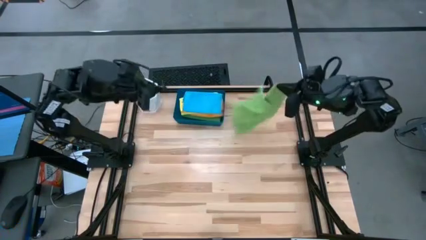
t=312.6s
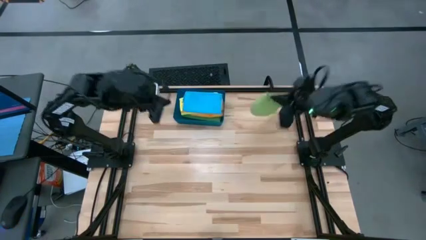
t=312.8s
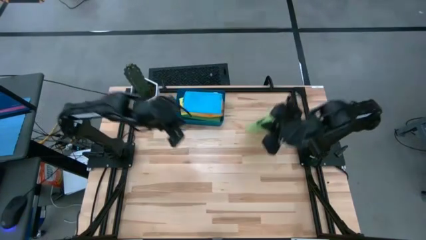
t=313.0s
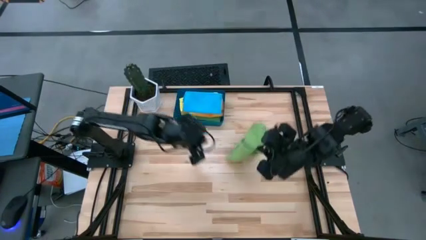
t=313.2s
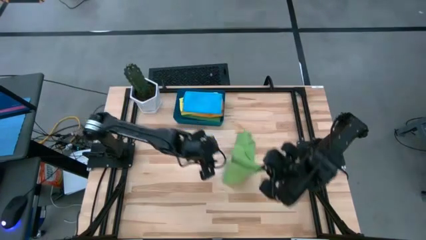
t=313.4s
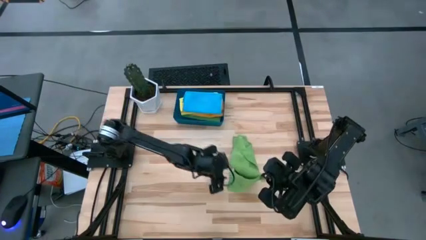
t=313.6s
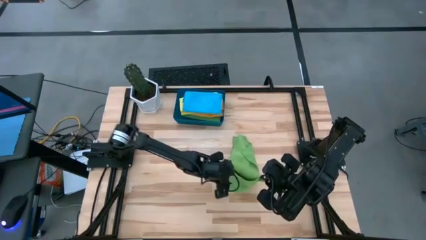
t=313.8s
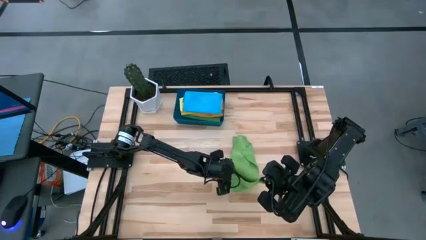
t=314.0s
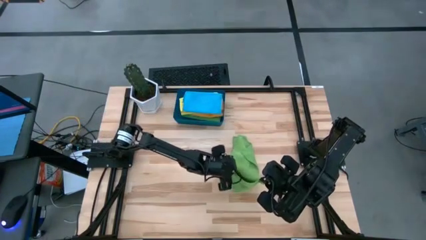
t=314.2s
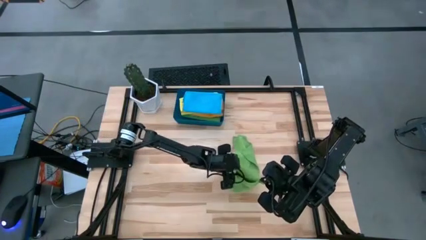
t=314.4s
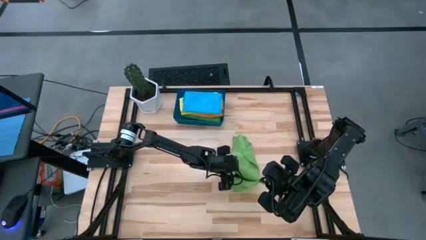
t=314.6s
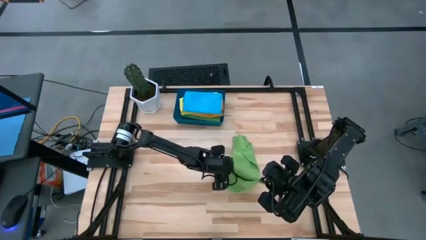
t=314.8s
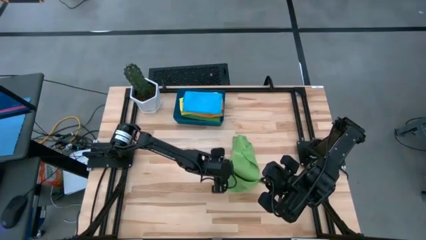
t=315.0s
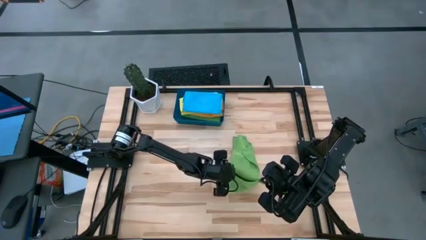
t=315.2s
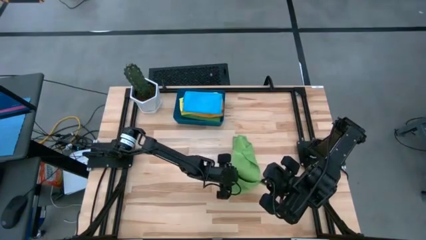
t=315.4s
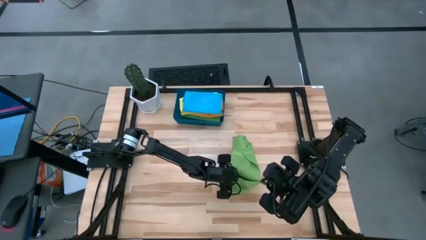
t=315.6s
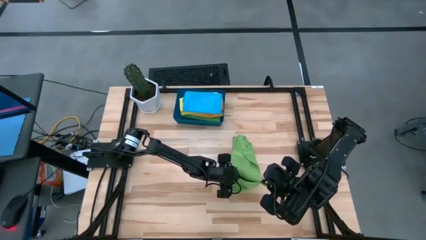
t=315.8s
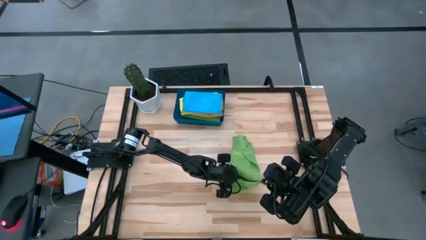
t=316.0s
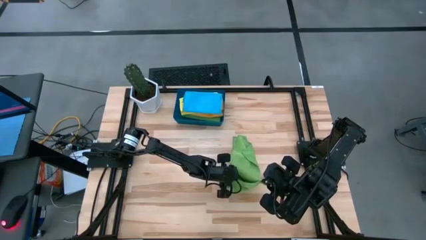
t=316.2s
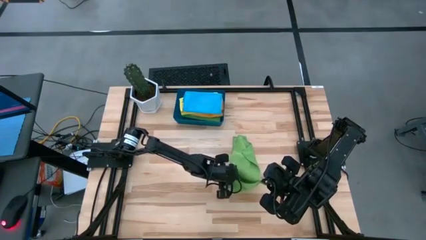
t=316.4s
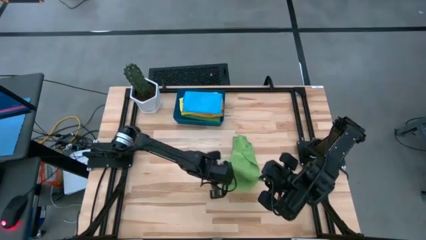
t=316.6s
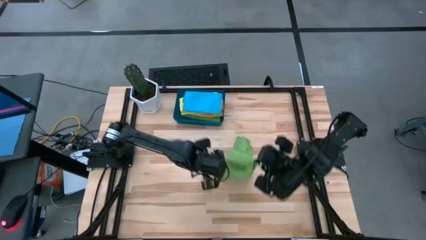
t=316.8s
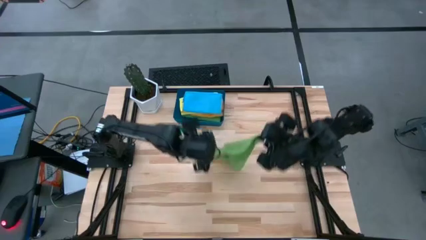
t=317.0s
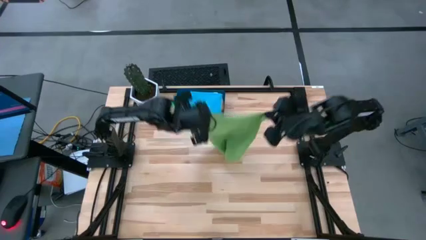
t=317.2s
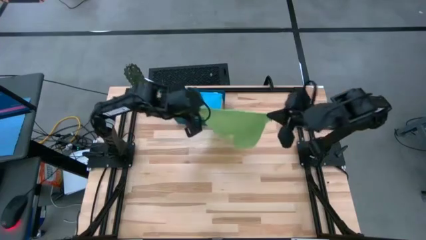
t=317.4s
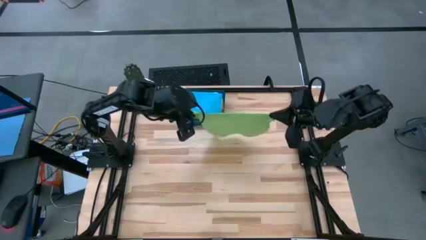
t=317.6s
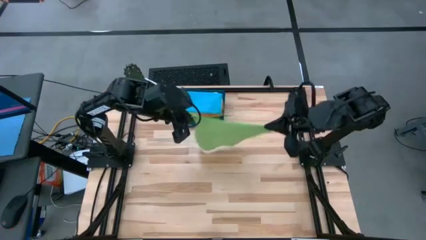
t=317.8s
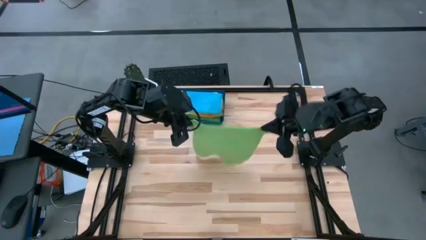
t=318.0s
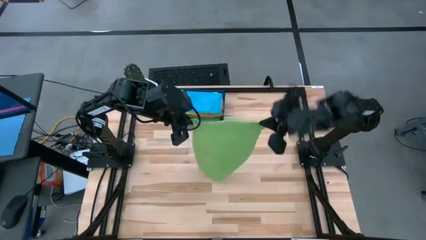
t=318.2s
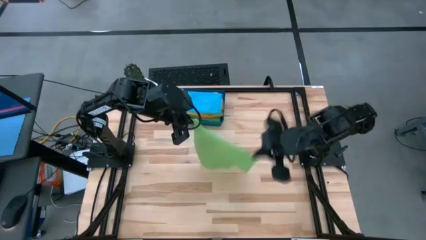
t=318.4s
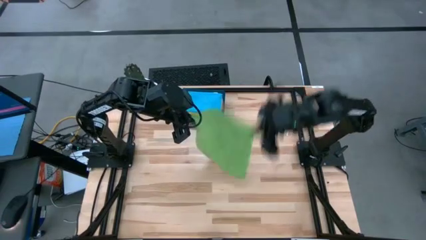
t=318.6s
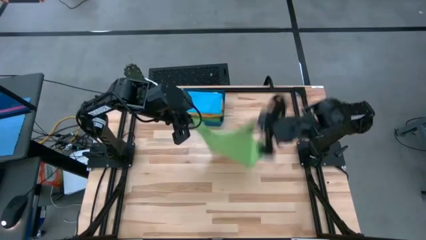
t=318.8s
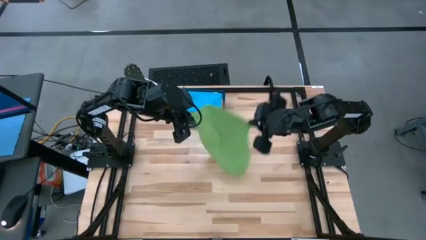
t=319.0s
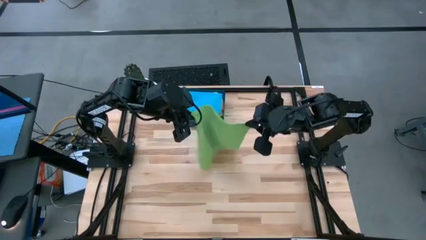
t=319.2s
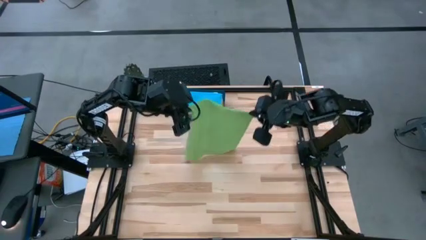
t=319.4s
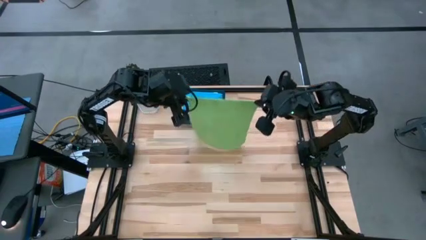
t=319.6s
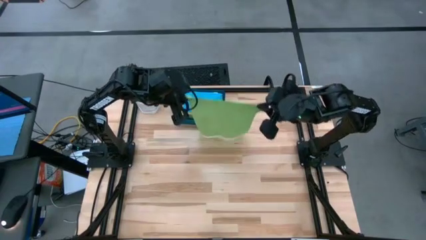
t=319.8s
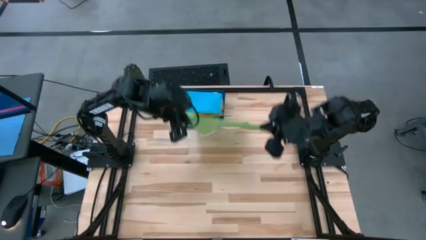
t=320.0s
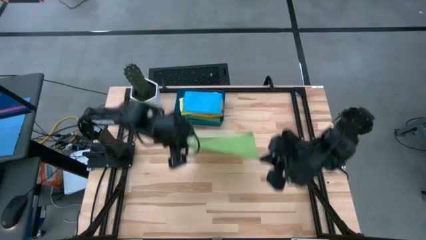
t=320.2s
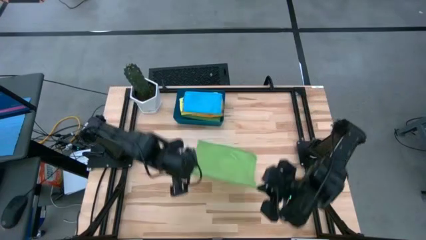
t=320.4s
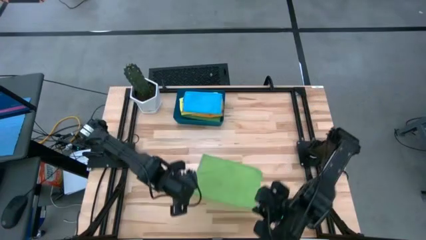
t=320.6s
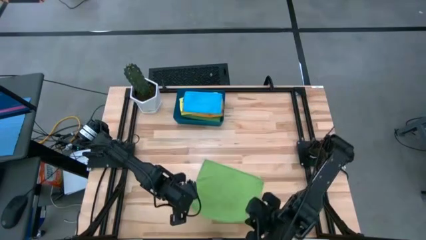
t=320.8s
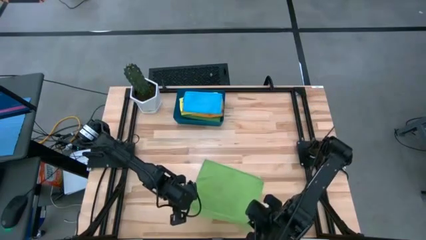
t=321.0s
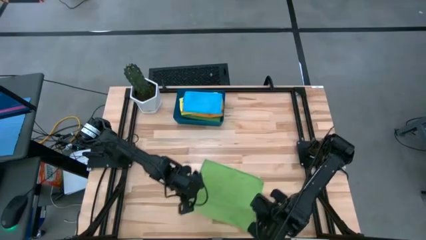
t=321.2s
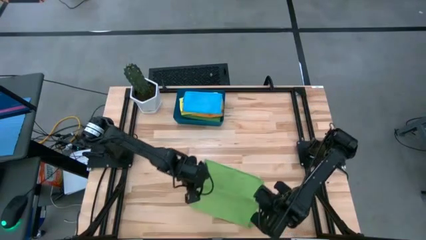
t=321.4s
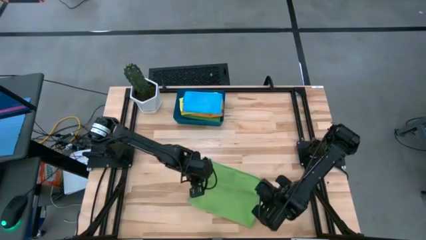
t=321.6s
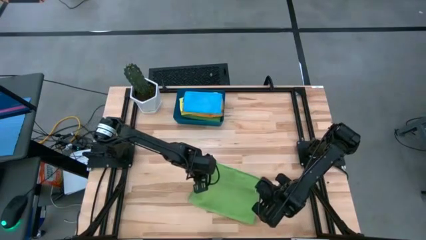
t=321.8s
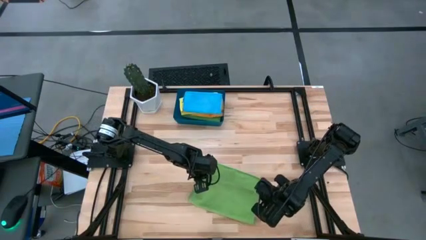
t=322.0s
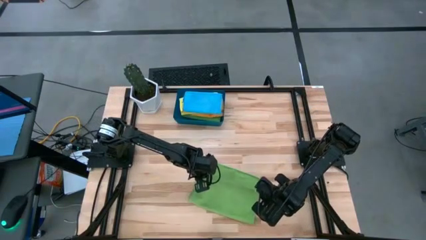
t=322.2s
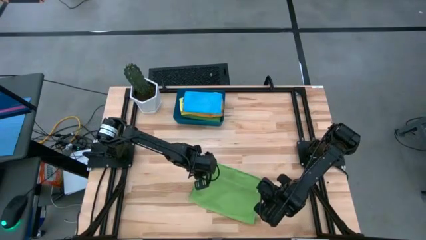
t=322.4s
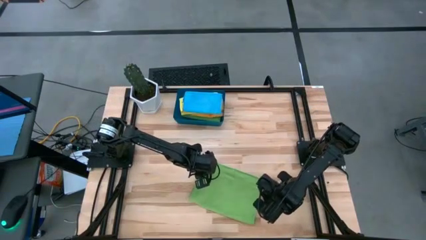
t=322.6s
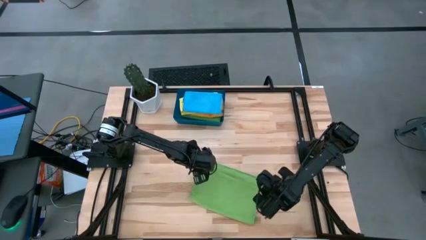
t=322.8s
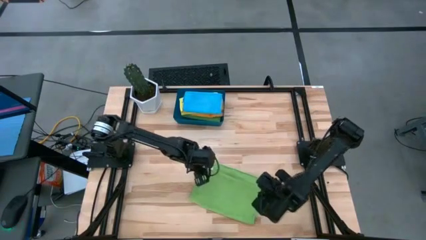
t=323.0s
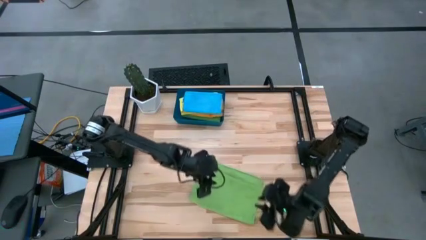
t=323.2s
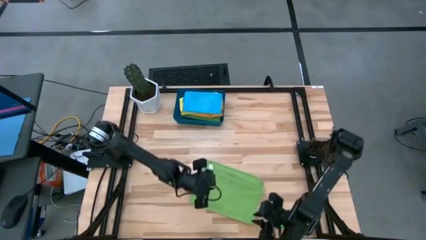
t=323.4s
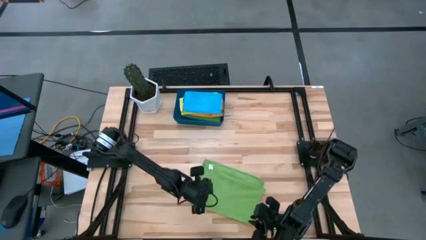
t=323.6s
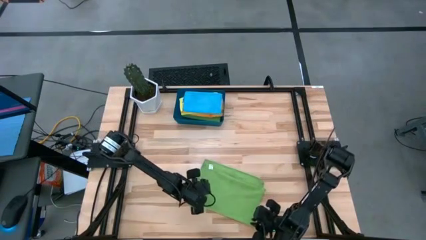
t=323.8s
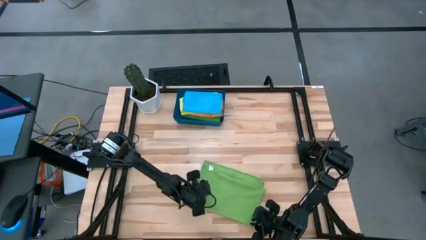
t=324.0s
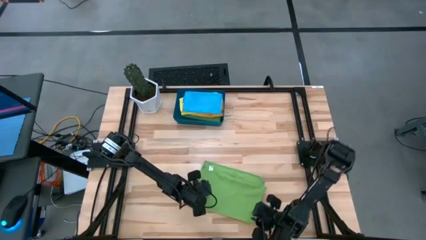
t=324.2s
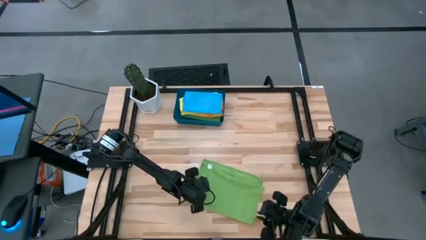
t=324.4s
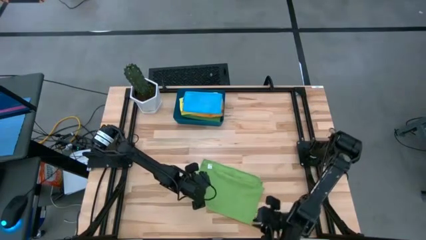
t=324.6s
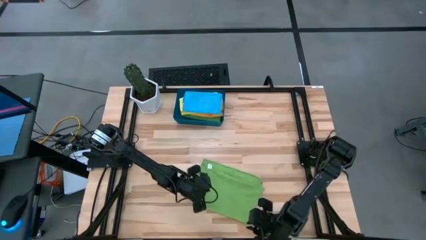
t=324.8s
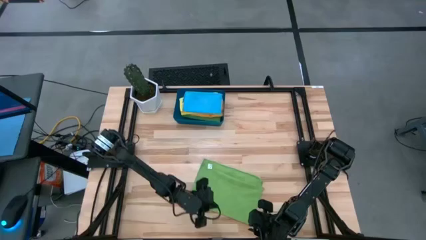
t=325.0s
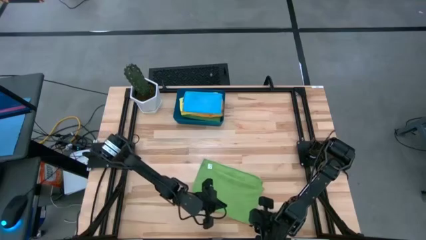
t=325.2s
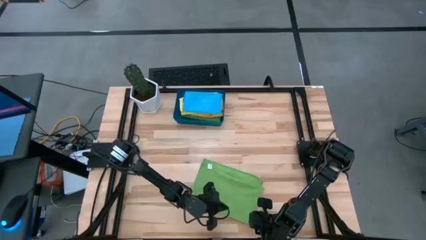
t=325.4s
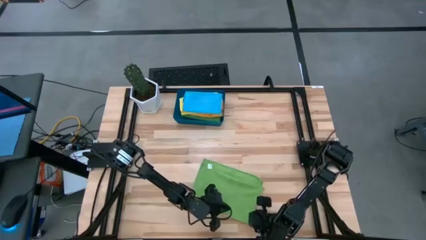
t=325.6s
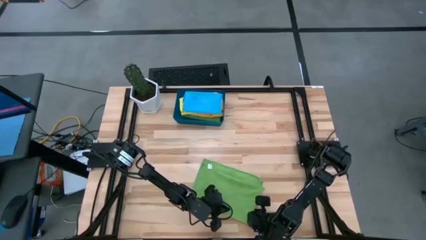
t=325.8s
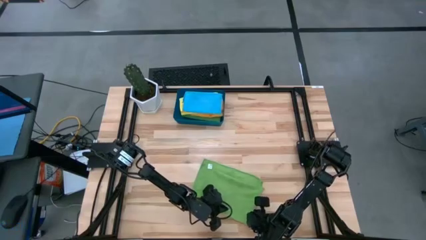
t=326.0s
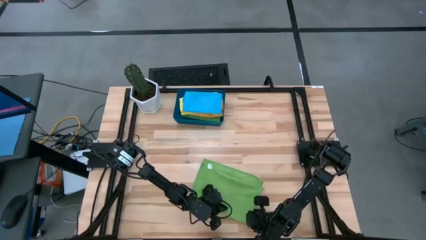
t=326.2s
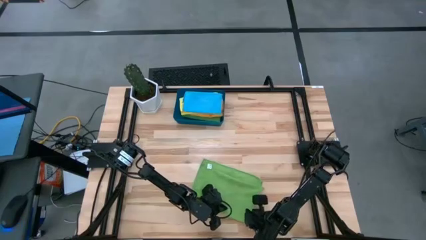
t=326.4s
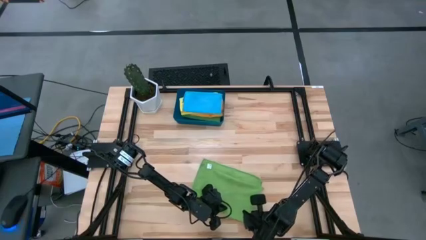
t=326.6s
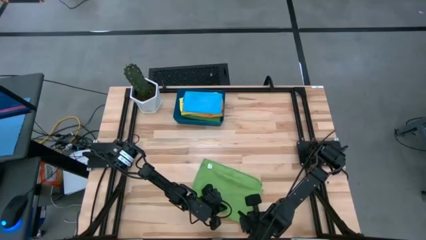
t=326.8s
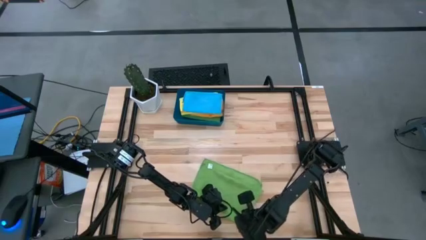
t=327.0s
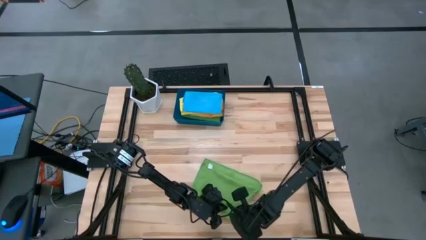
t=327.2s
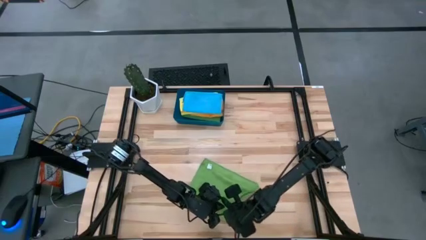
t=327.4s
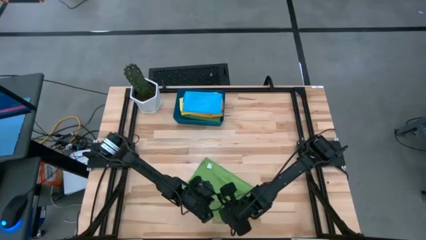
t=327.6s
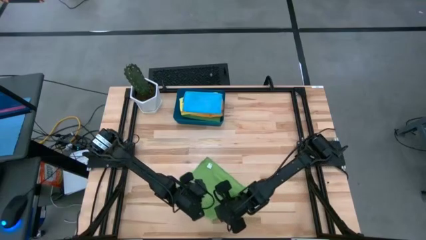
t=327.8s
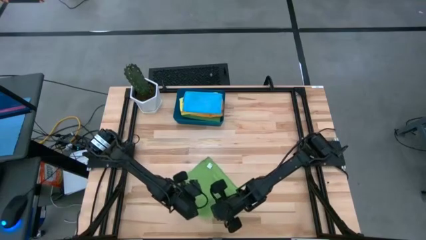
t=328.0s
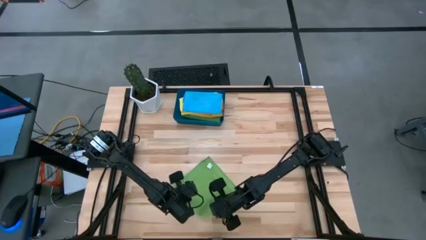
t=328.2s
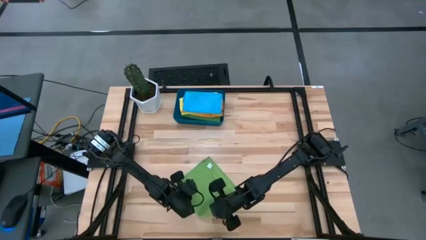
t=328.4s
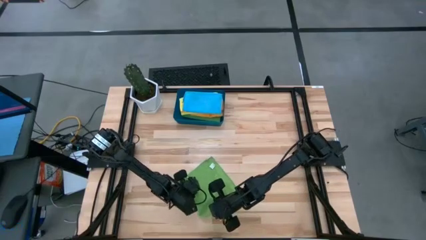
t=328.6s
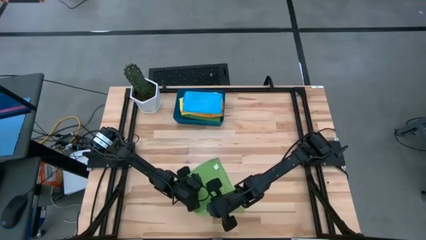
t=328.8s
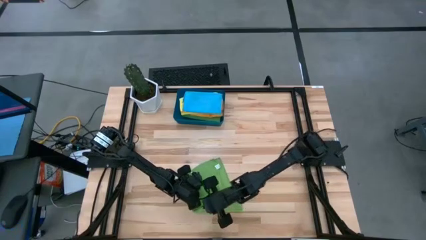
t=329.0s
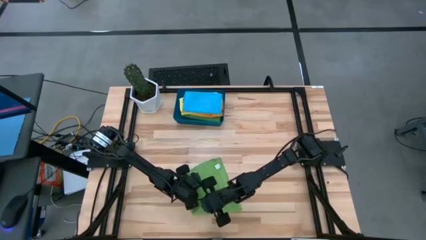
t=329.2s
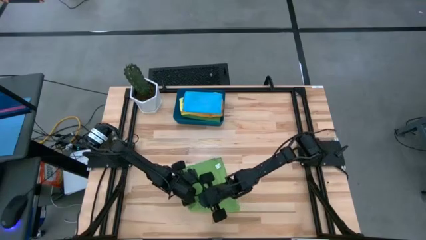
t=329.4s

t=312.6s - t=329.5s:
Task: Fold microfiber towels
Fold the green towel
